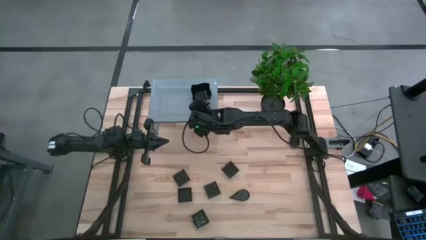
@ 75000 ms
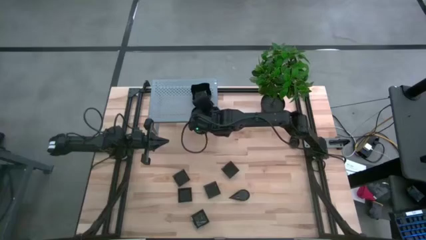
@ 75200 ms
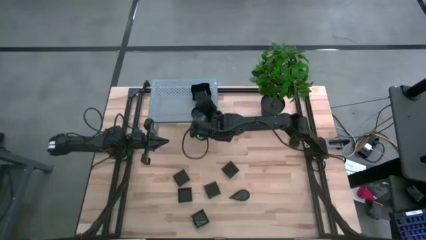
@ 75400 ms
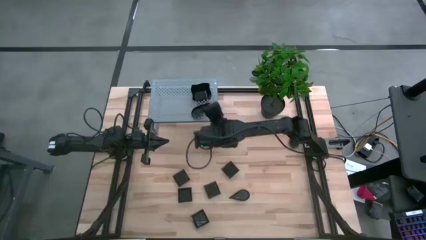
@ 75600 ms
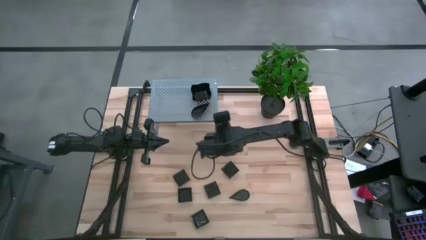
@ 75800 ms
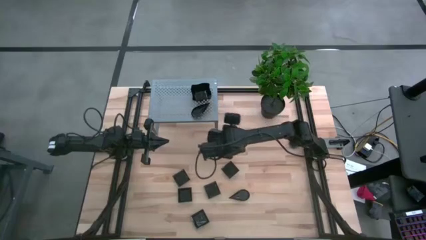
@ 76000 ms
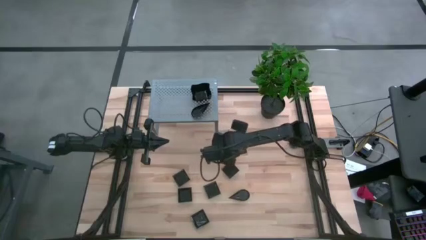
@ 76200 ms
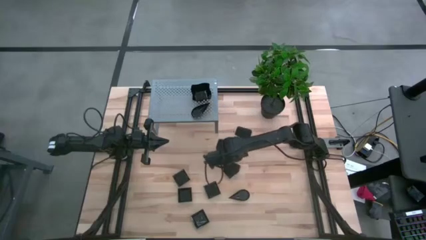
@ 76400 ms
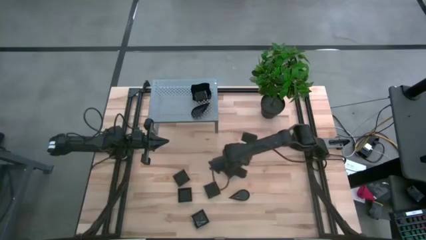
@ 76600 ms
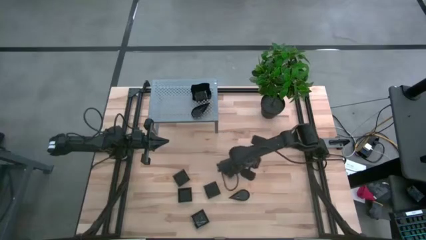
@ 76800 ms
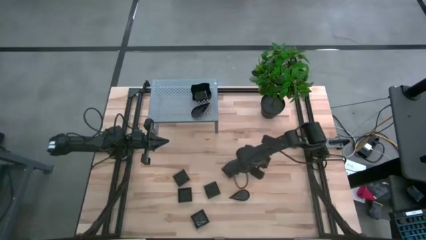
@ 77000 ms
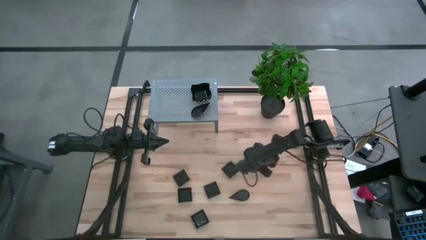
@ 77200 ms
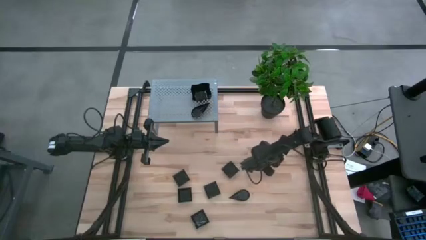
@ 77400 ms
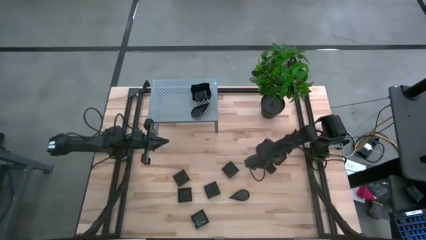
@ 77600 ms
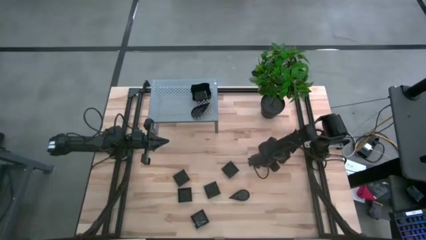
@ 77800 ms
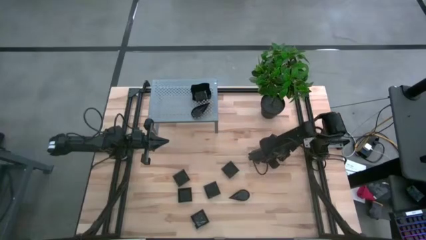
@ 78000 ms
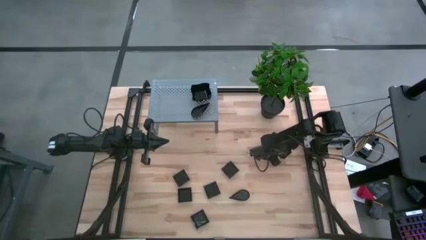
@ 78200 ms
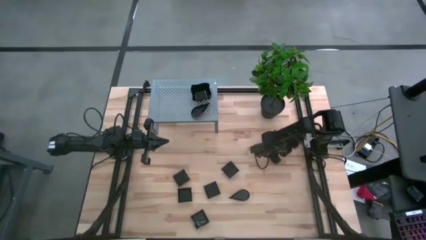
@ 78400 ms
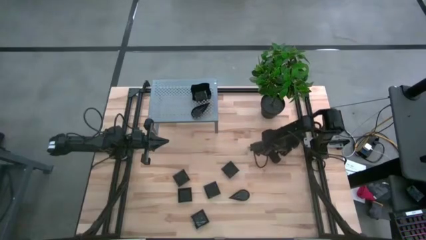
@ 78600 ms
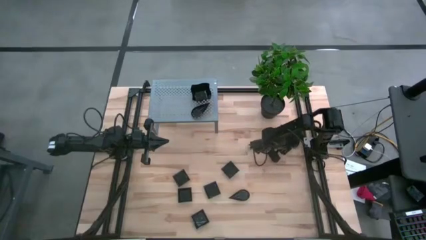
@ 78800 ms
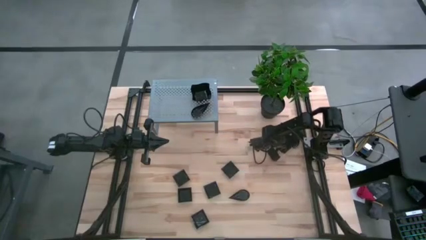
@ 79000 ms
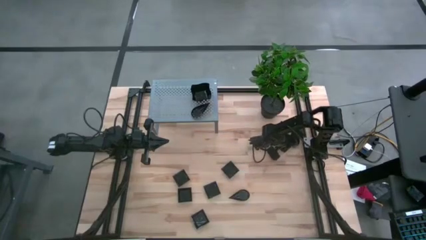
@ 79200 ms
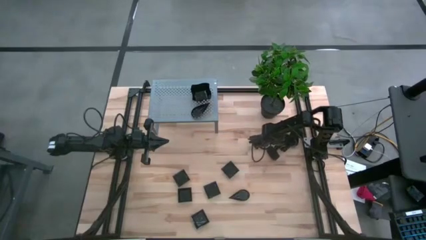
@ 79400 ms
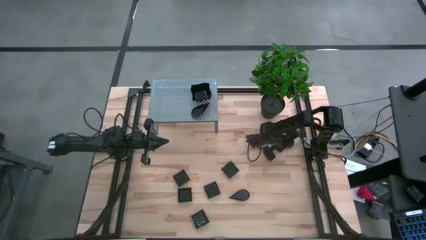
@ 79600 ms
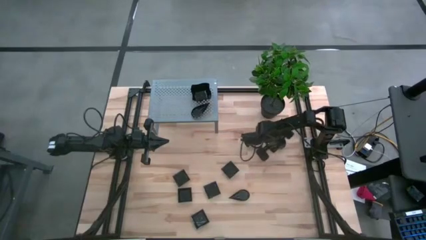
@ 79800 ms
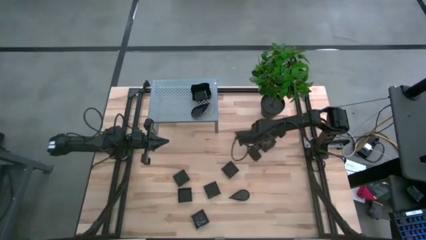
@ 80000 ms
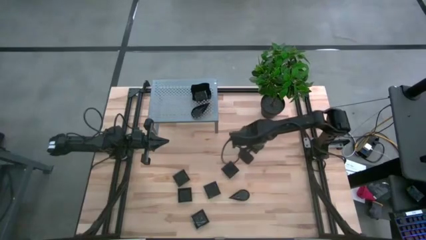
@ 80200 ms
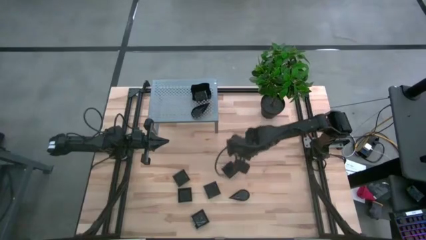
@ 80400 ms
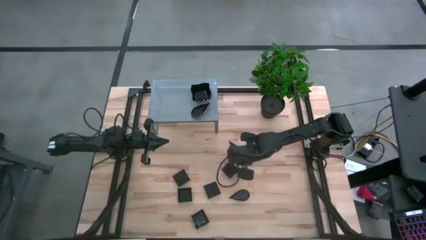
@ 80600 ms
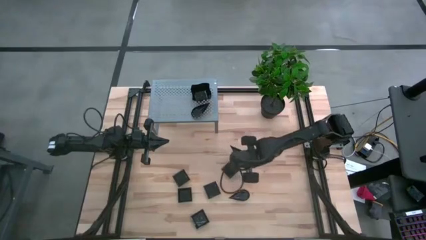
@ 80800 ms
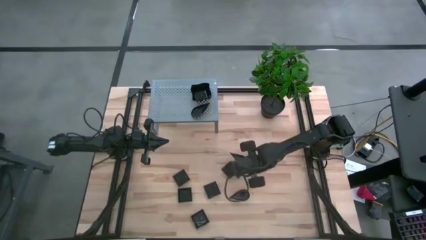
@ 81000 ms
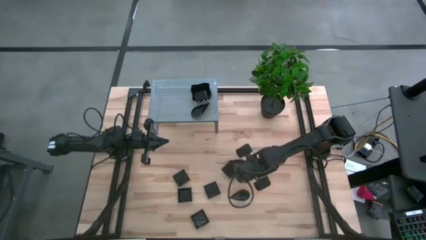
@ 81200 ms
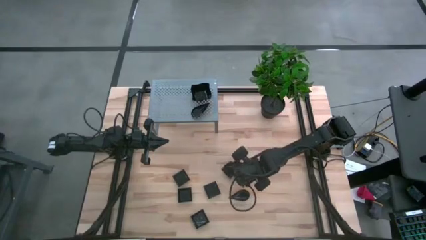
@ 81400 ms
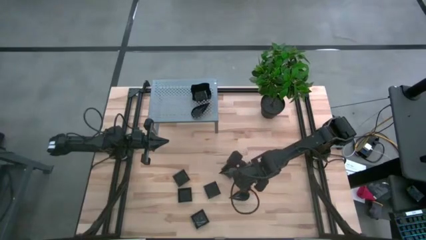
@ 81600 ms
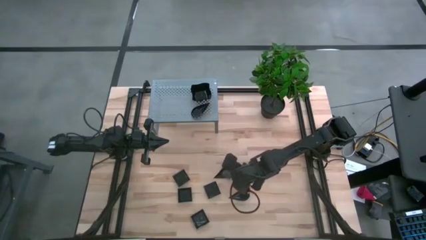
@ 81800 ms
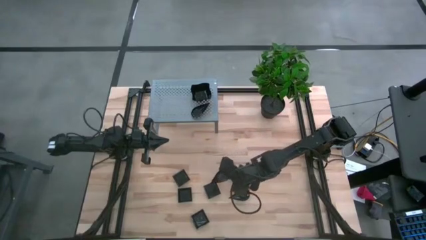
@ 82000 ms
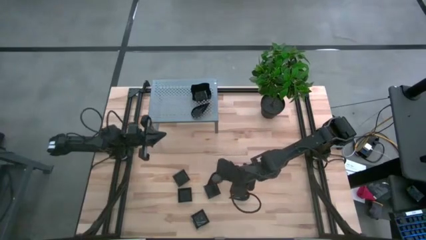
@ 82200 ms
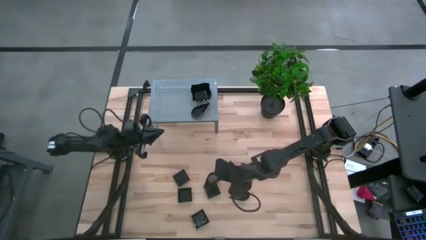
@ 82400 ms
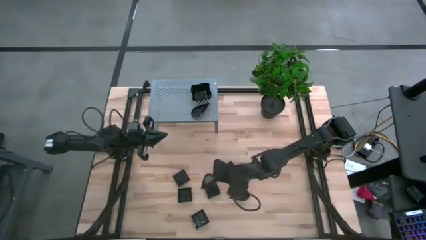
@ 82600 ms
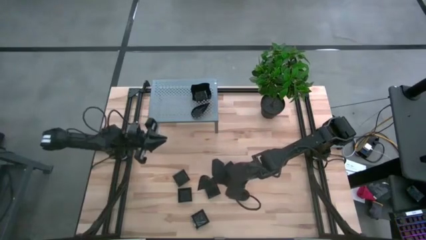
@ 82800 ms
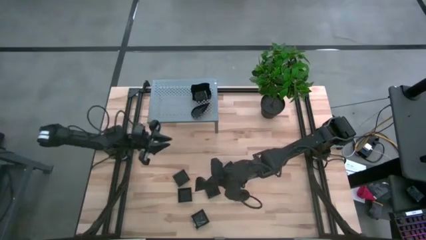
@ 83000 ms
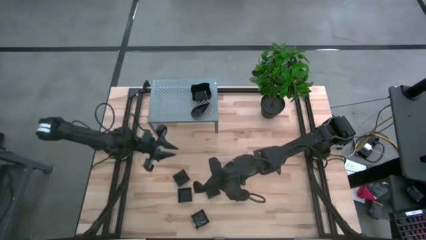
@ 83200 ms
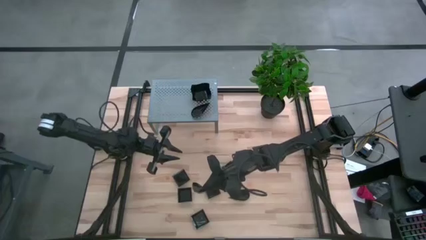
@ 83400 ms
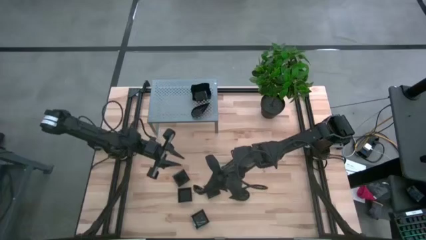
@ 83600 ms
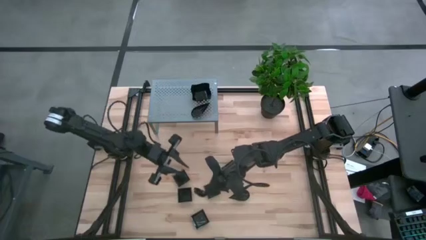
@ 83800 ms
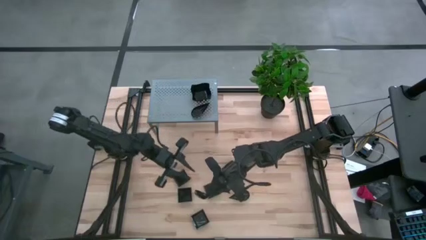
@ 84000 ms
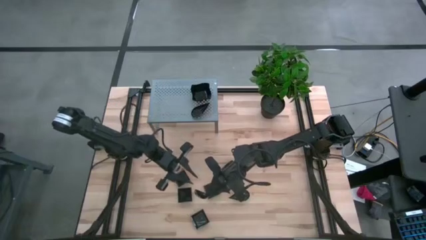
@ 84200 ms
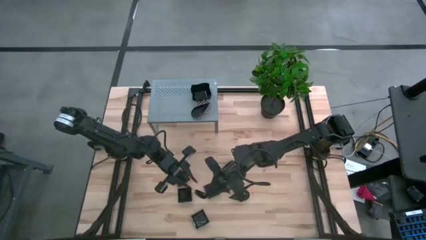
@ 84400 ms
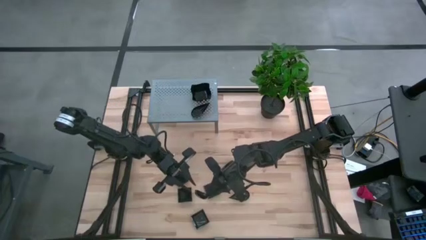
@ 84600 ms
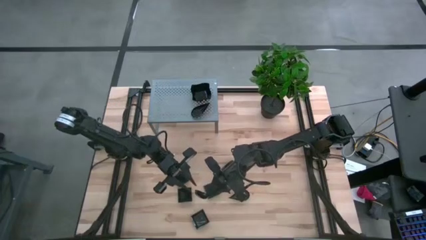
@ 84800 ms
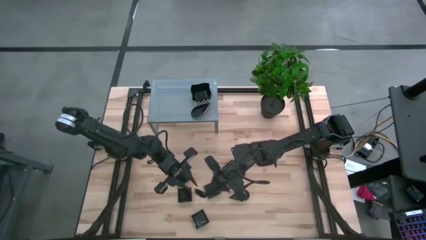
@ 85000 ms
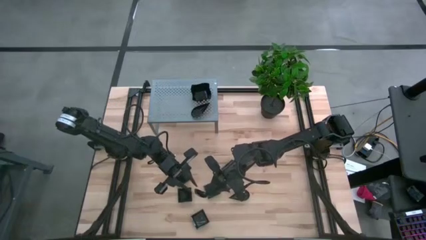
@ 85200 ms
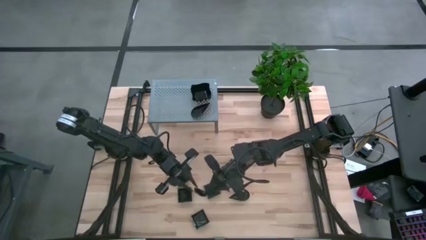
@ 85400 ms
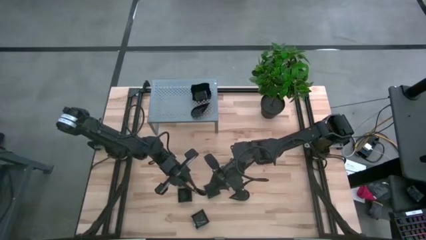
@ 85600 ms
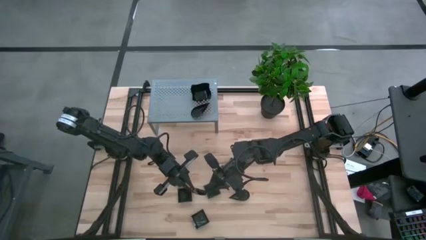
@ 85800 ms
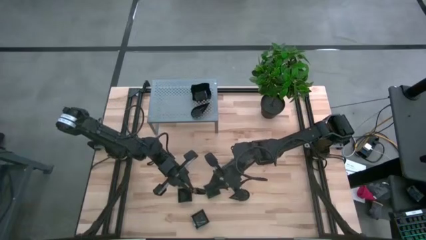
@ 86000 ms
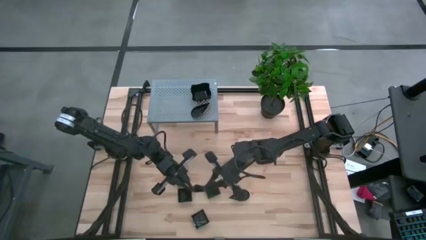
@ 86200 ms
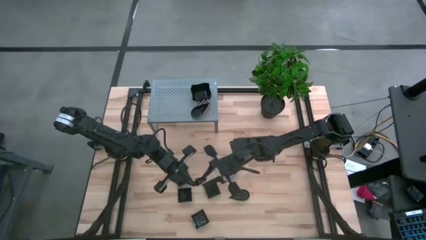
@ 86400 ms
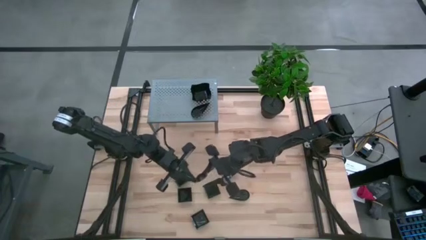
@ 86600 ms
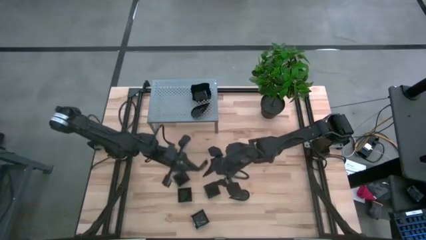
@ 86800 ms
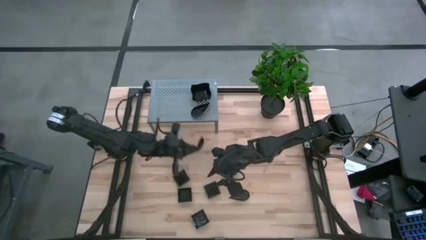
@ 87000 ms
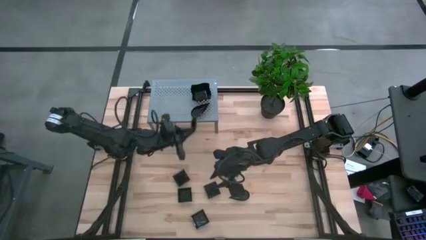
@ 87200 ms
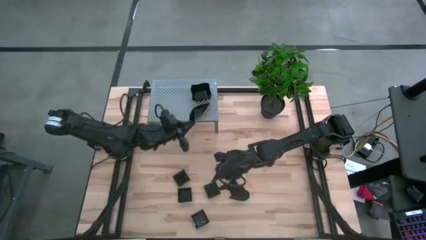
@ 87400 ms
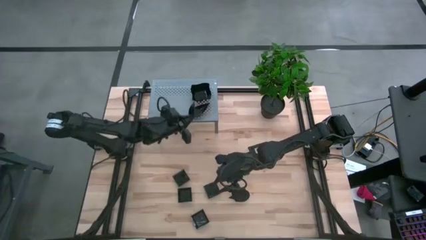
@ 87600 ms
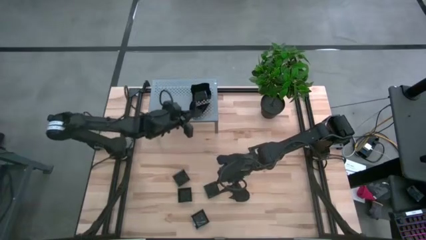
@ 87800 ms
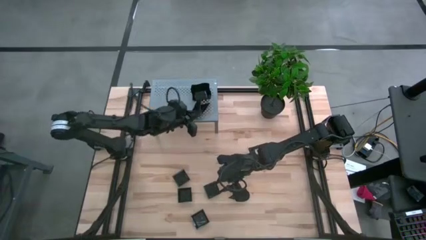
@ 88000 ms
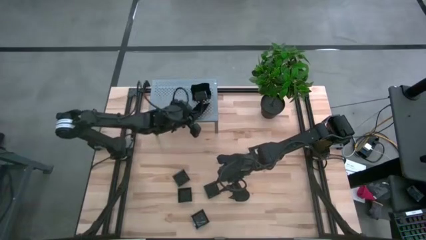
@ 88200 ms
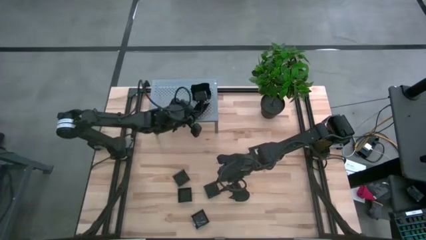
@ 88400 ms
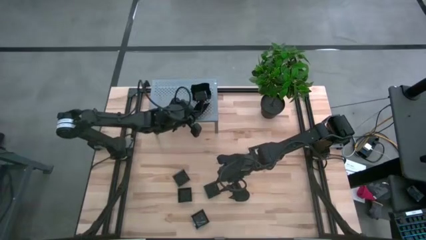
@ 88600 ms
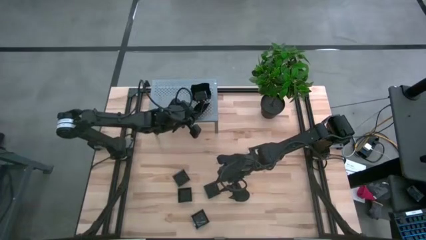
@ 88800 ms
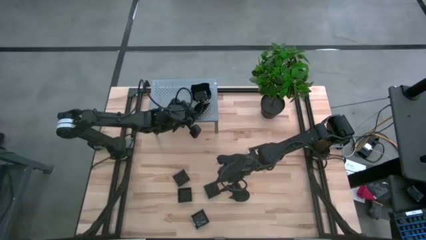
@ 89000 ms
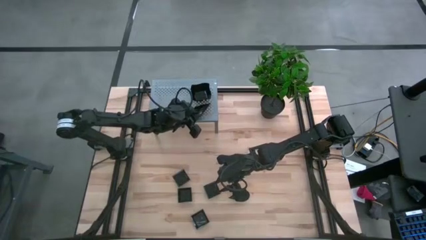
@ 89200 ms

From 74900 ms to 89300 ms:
Task: Pick & Place Mini shaped plates
Stack the drop-shaped plate on top of the stacked drop-shaped plates on the shelf
